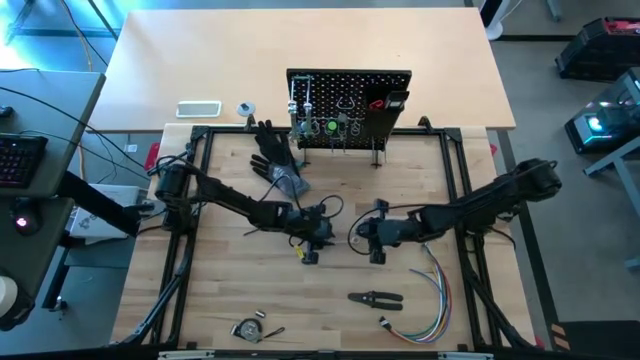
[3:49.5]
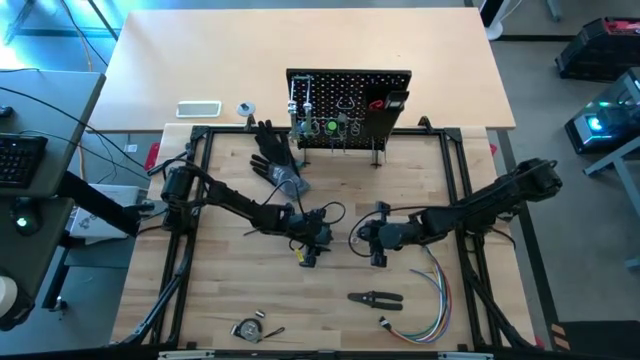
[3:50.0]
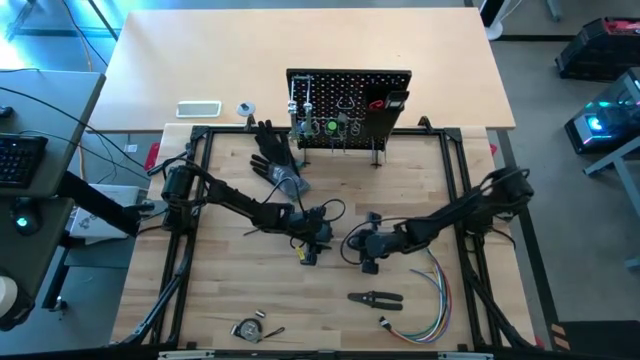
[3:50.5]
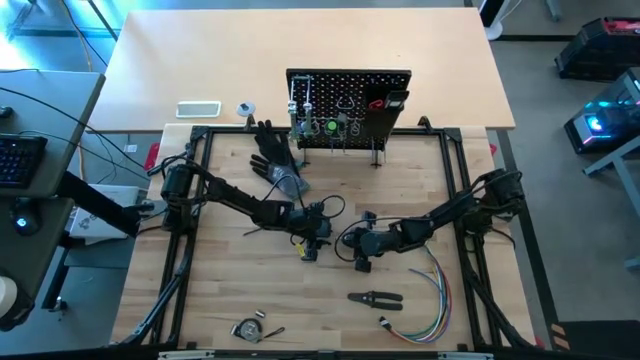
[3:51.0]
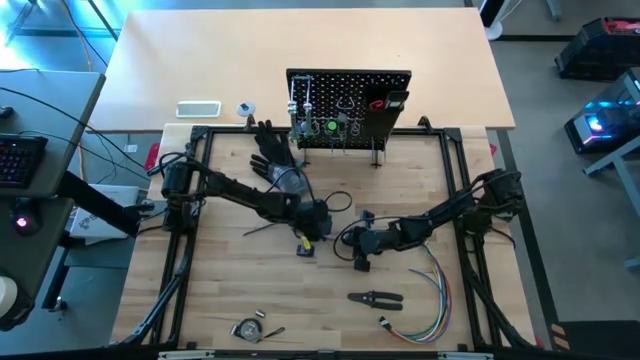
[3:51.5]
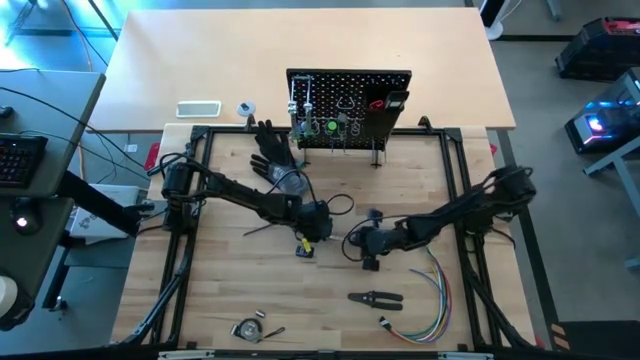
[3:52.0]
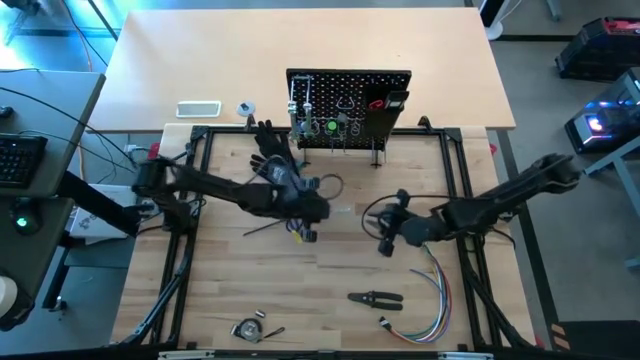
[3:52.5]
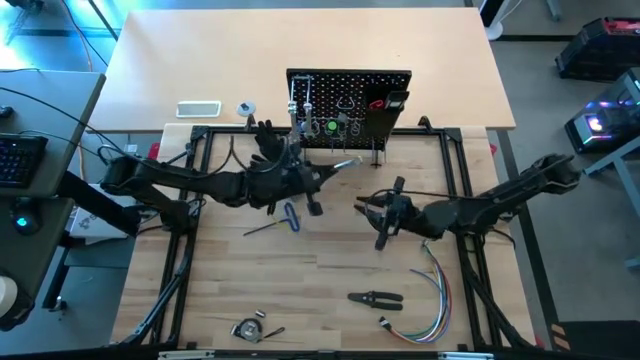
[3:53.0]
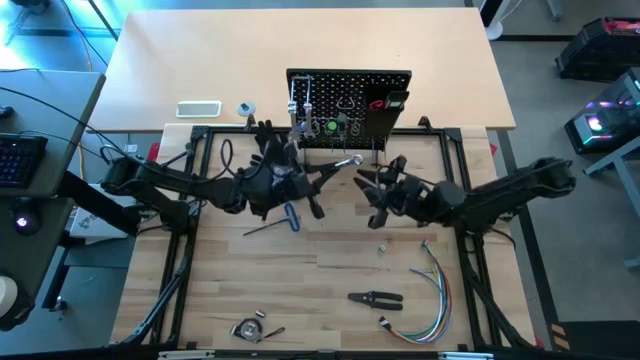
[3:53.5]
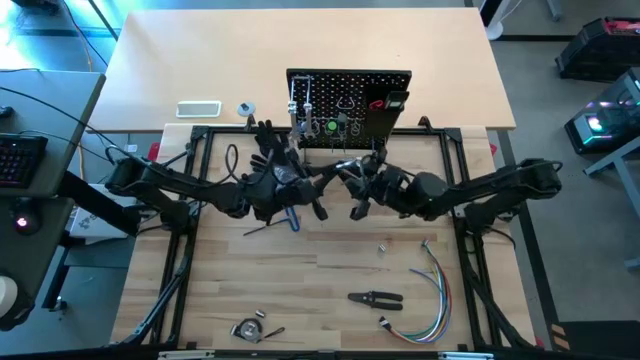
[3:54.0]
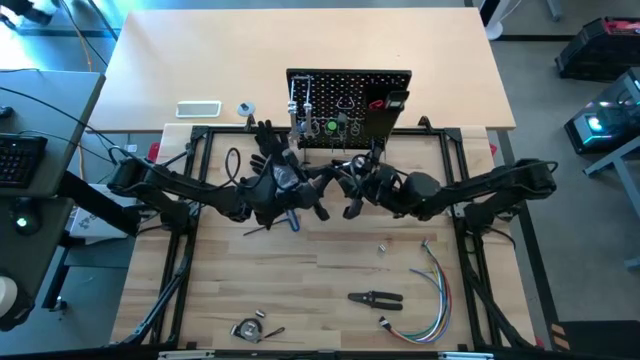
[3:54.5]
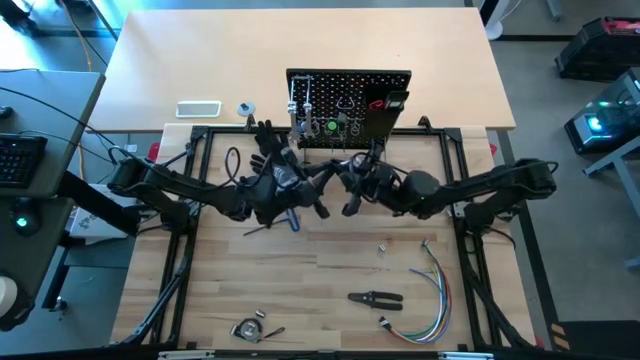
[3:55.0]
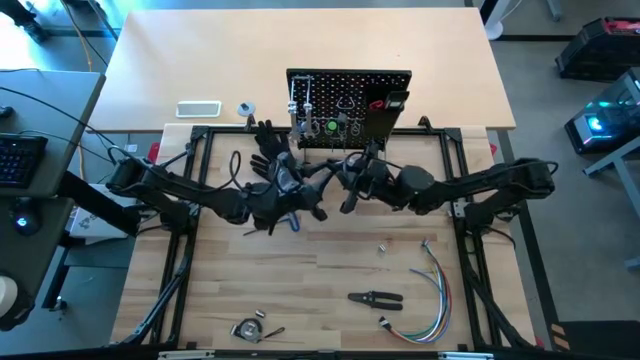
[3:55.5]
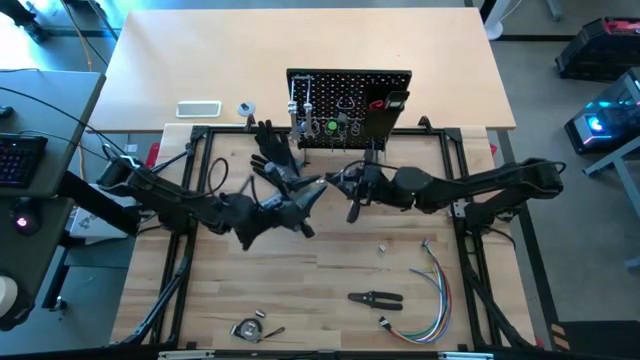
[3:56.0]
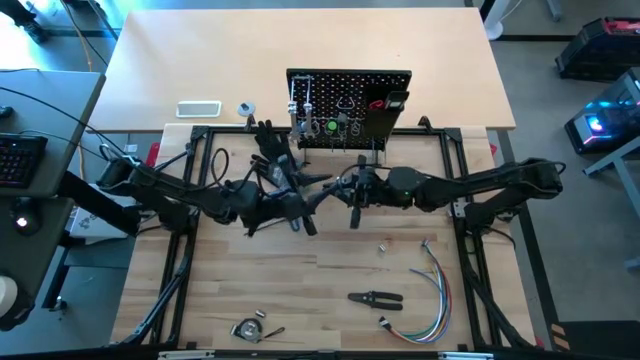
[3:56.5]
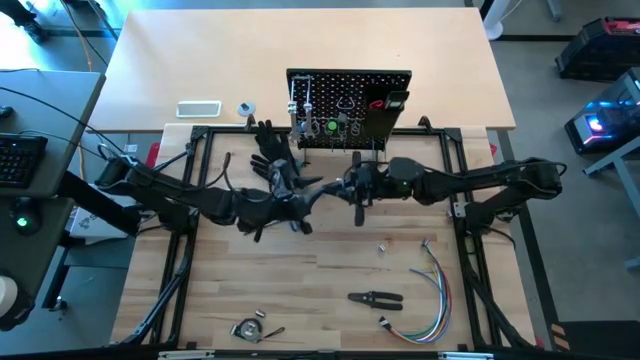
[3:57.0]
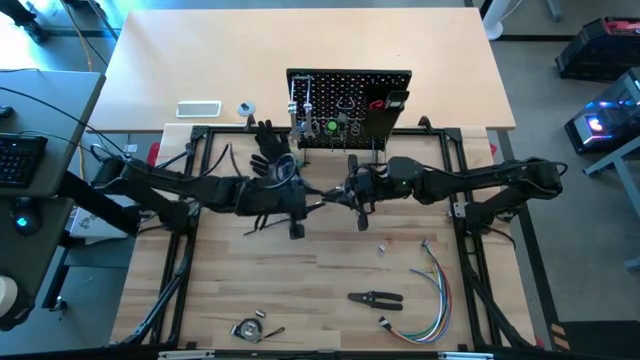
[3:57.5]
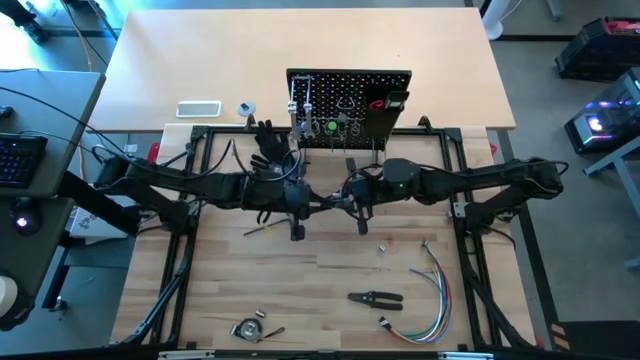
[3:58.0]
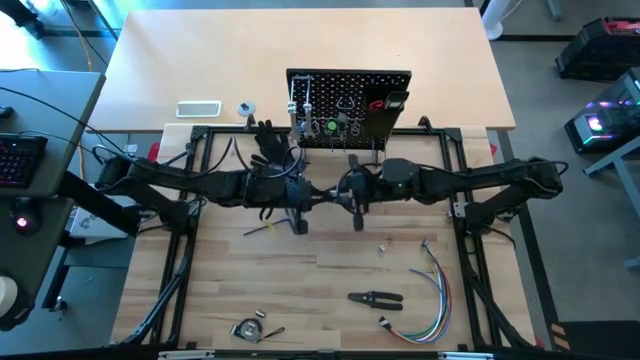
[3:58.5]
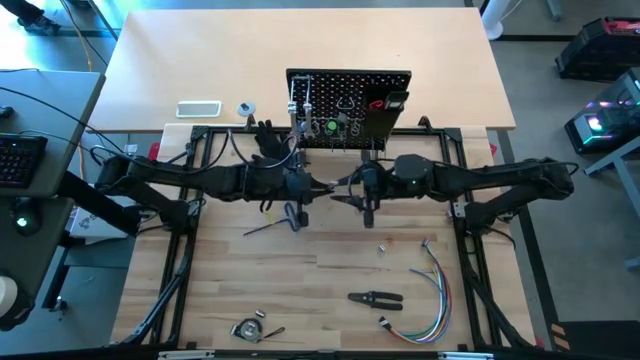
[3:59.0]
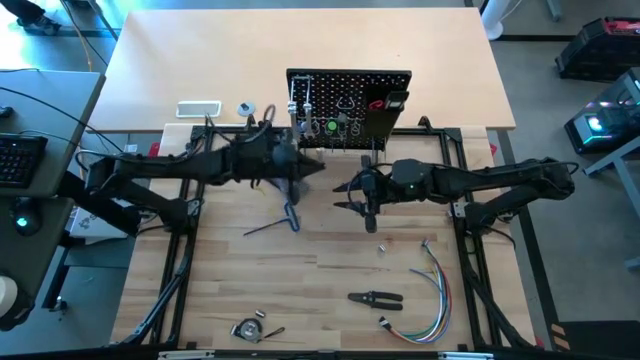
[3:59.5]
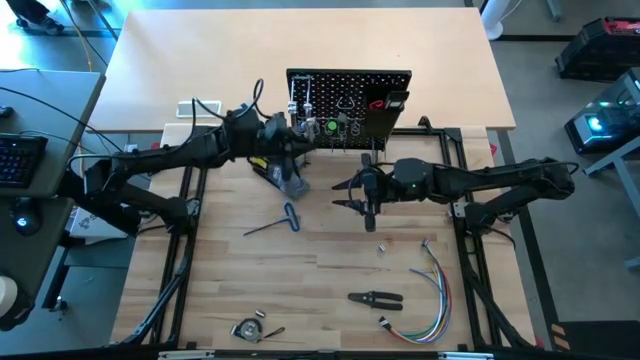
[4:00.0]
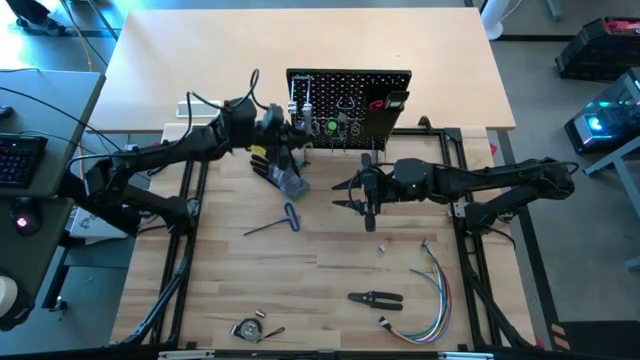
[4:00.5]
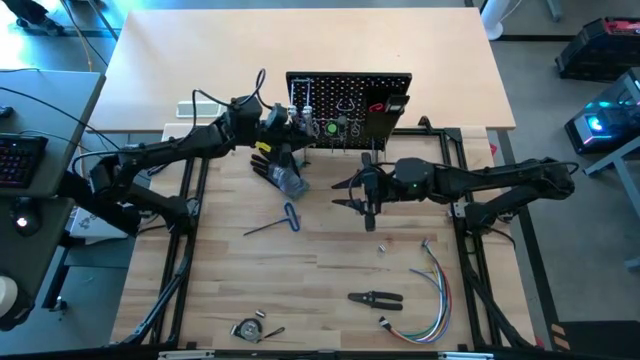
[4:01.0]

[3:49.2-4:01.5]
Task: Hang tools onto peg board
Hang the silver wrench on the pegboard

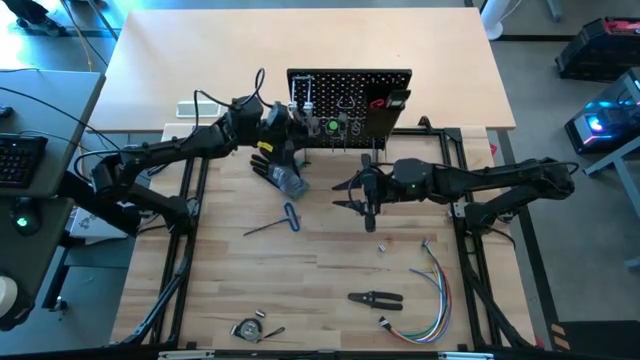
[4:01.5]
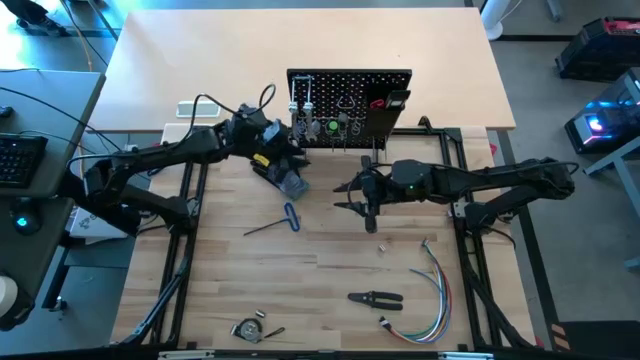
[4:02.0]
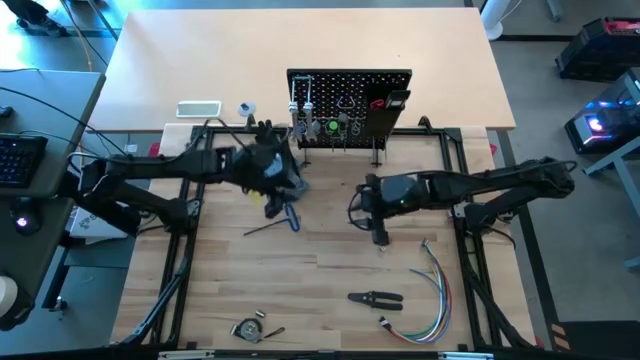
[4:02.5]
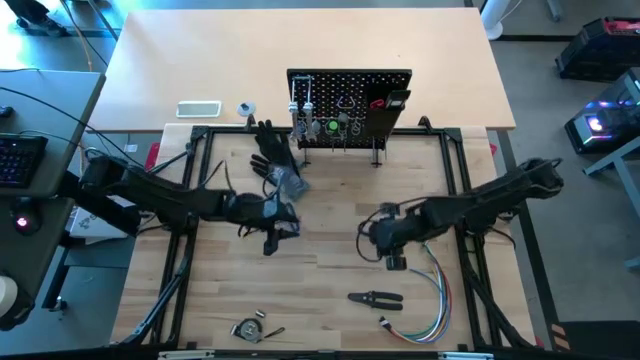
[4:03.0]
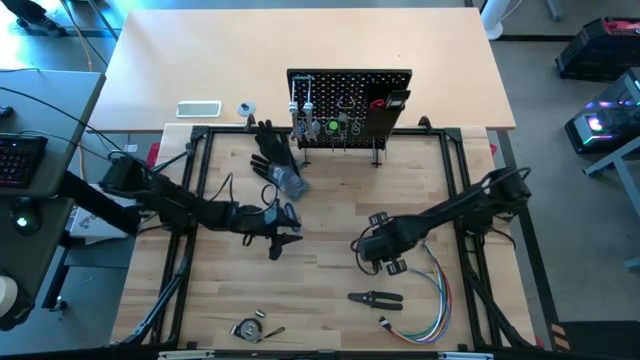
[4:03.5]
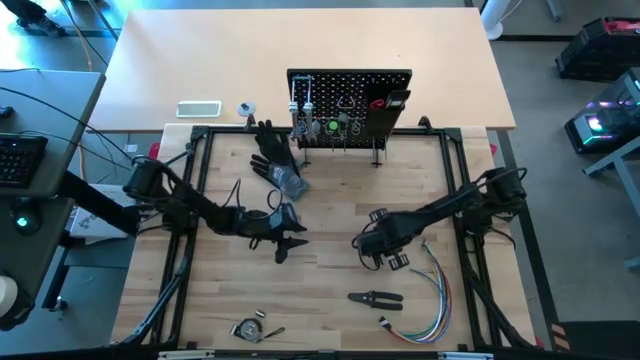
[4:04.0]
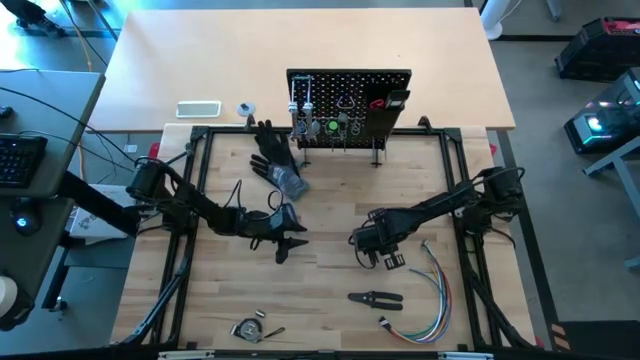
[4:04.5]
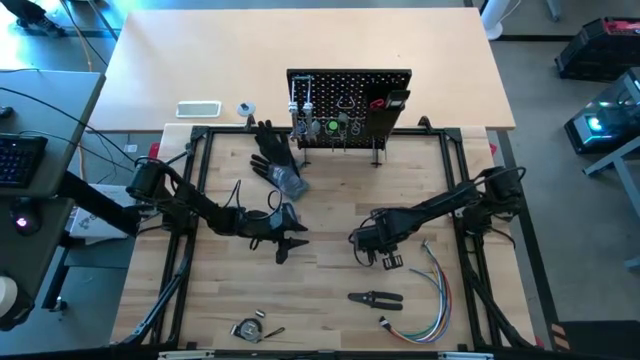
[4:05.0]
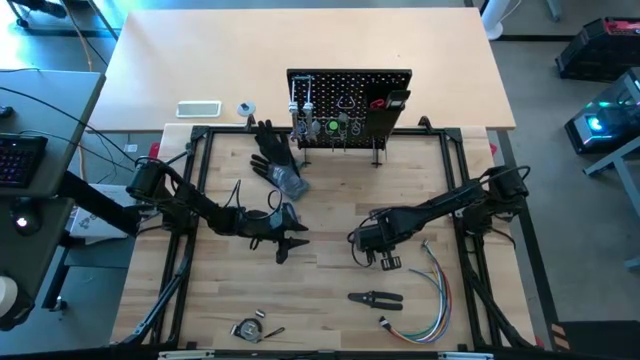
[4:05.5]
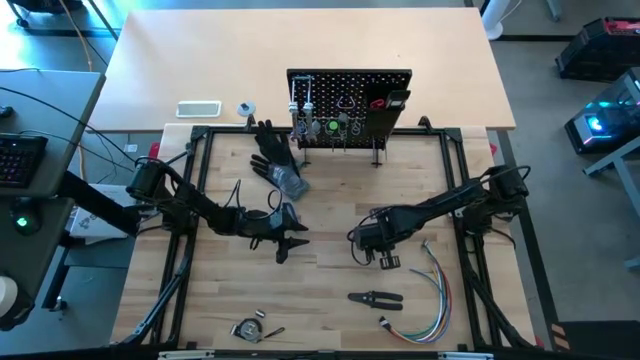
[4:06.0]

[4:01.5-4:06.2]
Put the silver socket into the black bin on the pegboard

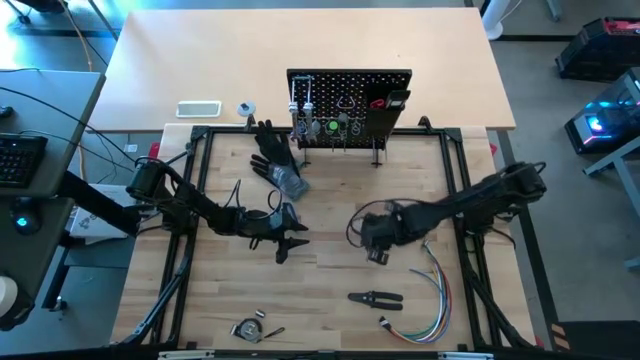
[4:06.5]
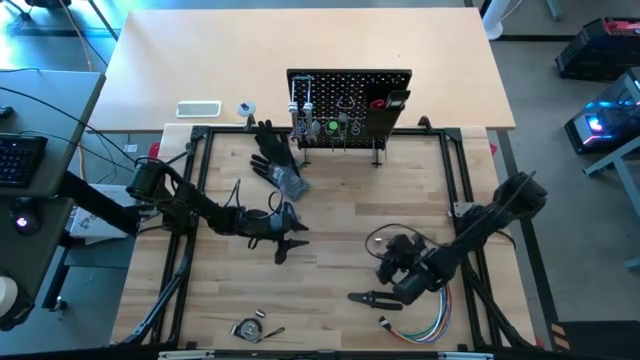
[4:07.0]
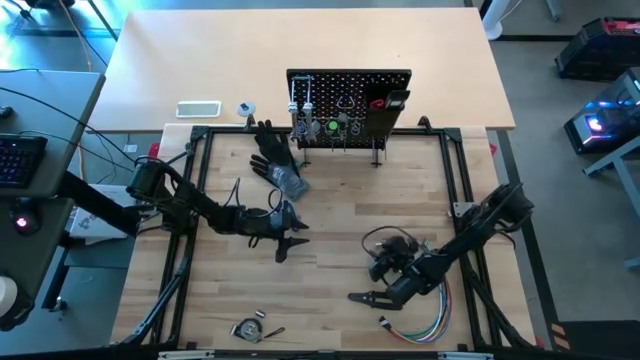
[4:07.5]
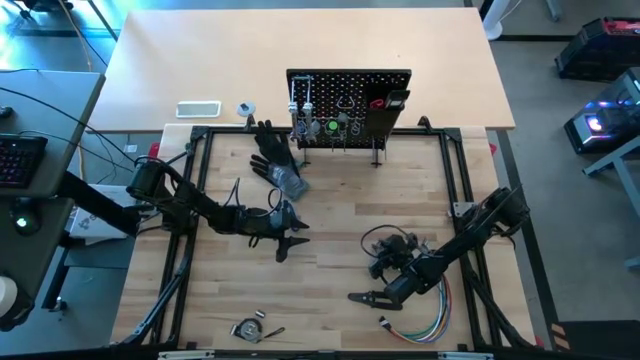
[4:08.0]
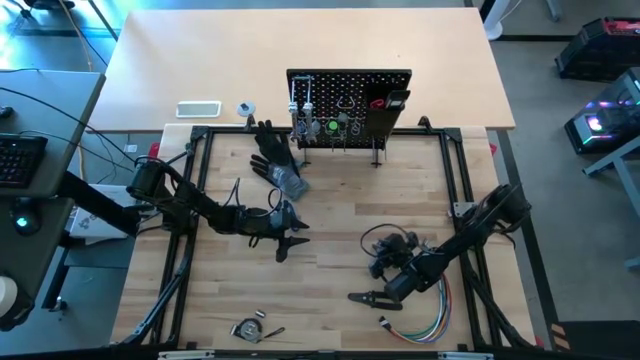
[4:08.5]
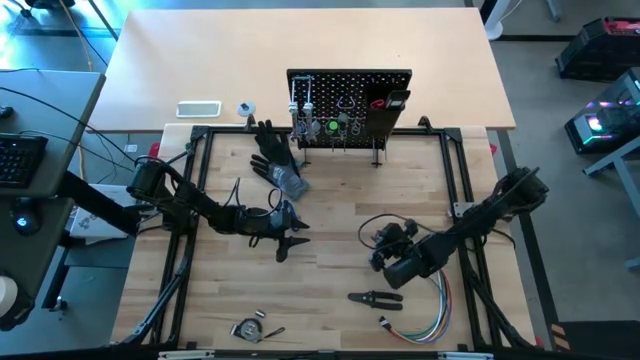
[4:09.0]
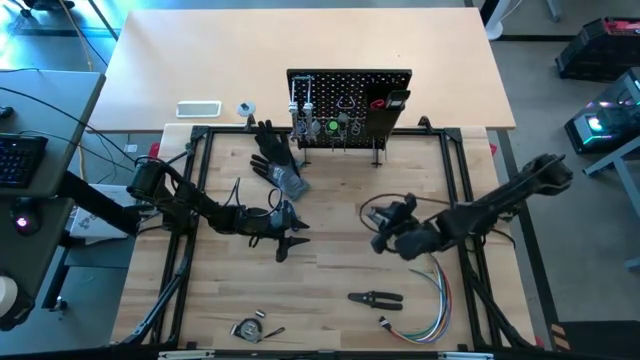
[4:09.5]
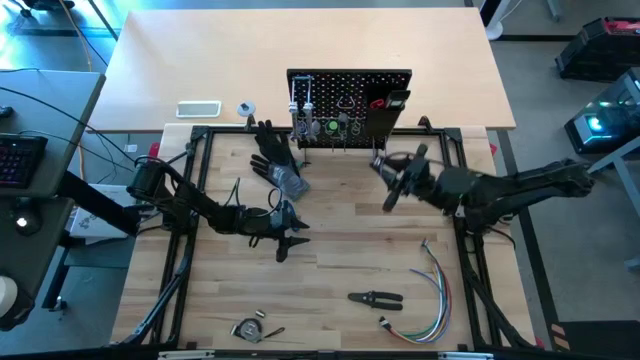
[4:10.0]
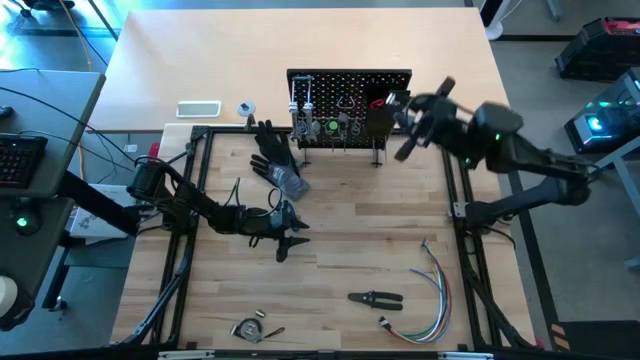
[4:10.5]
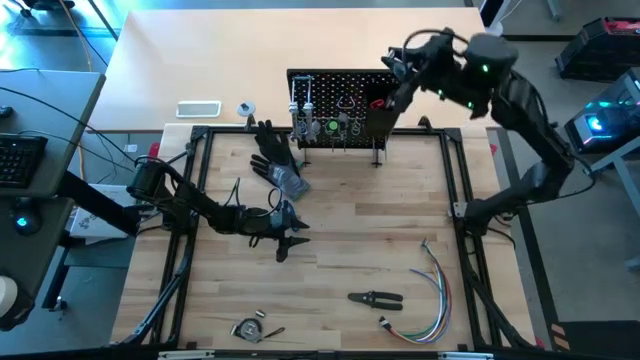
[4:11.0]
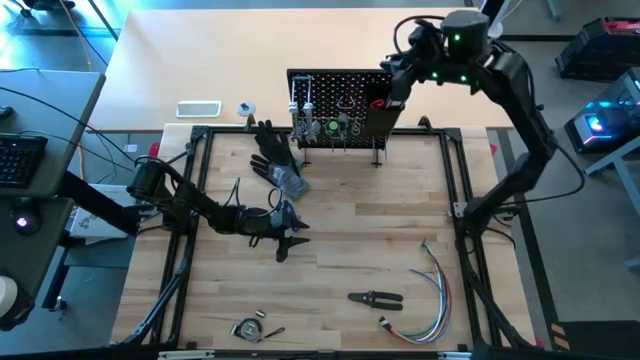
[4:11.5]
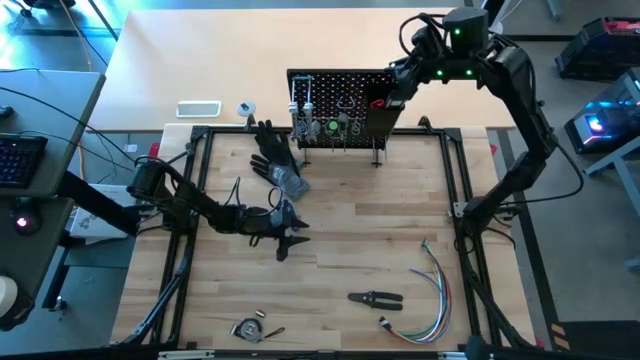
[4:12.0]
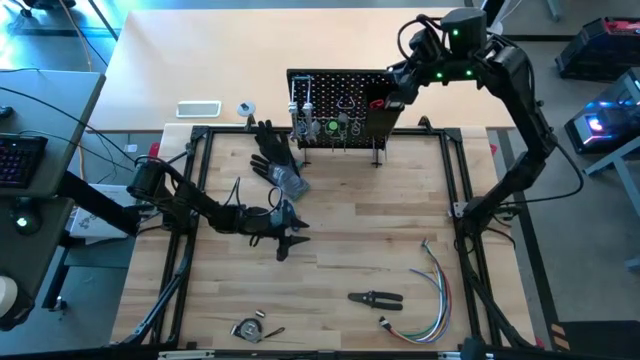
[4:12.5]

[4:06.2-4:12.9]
Put the silver socket into the black bin on the pegboard
